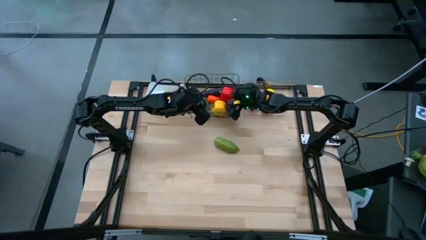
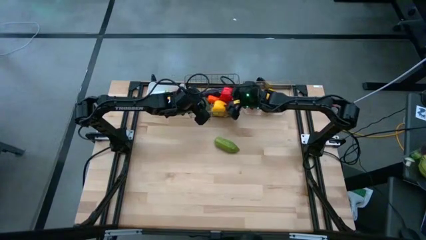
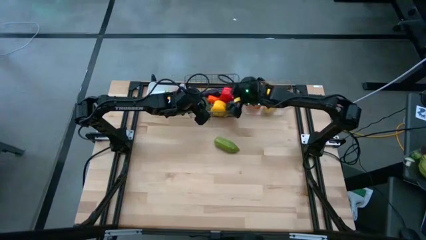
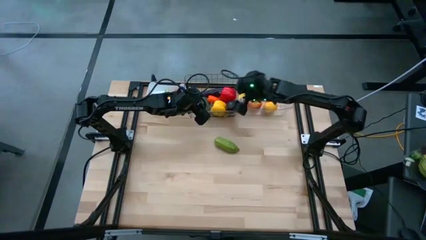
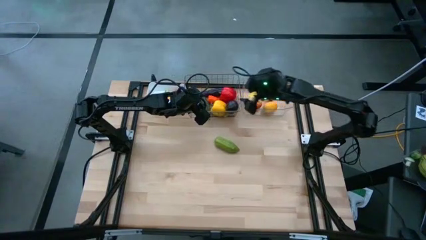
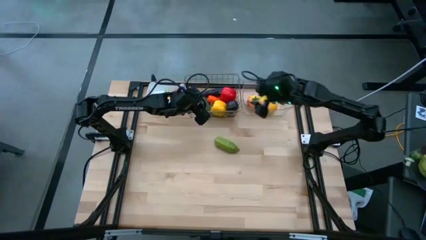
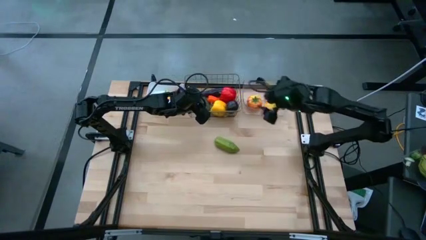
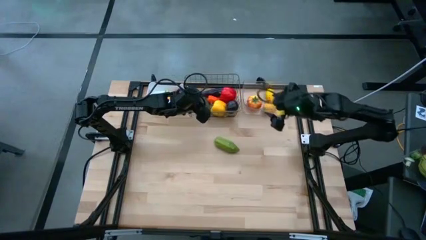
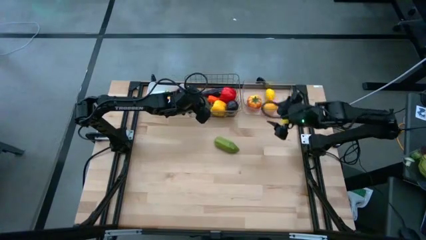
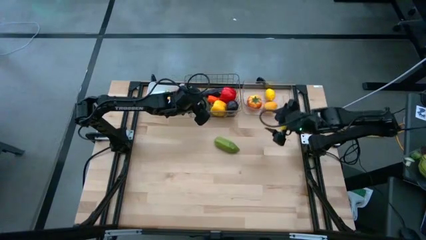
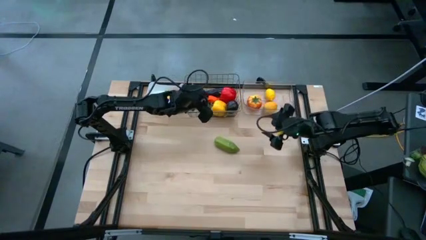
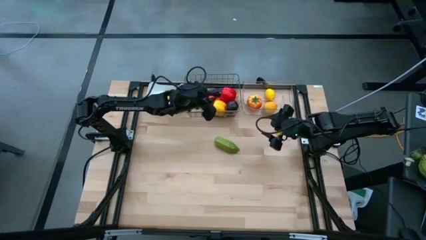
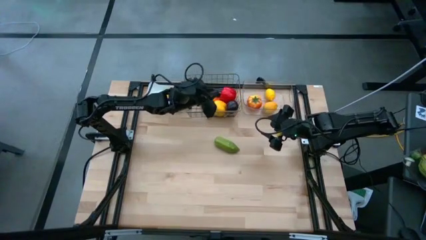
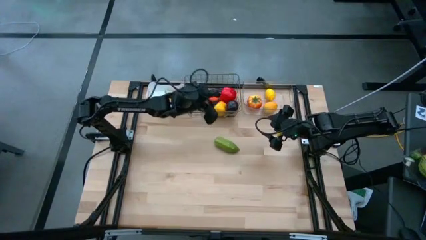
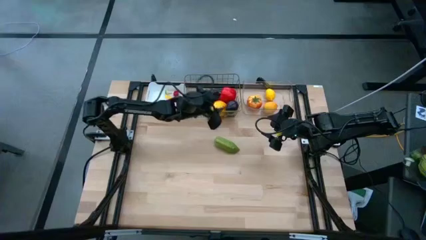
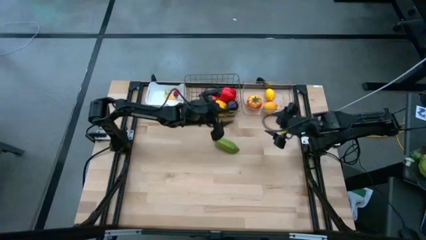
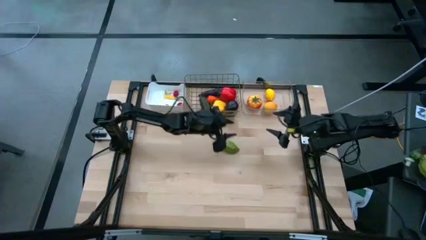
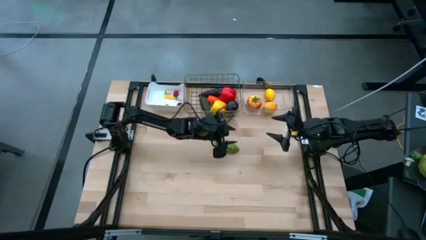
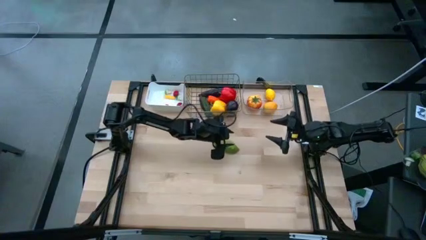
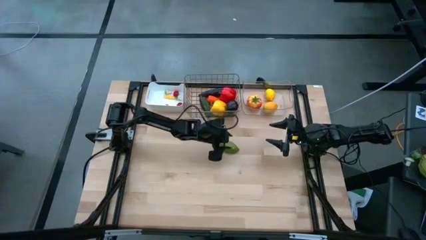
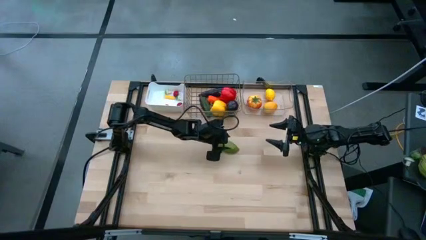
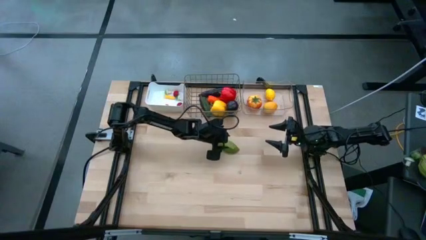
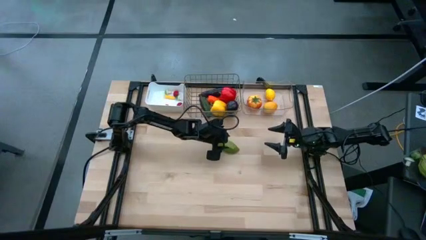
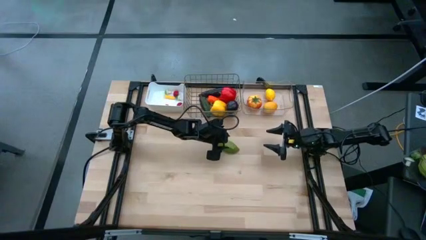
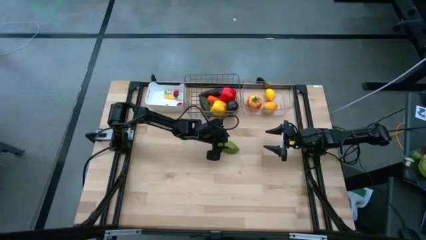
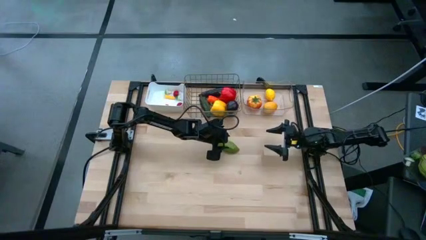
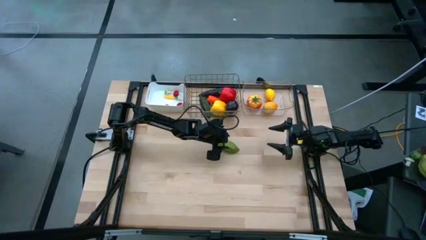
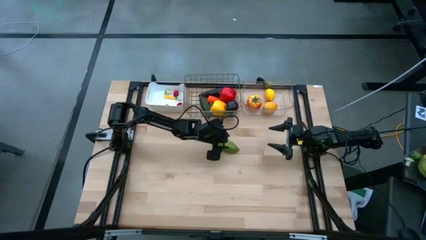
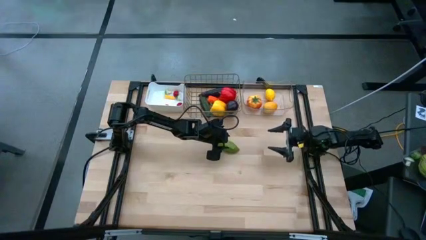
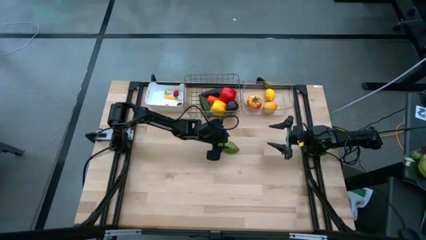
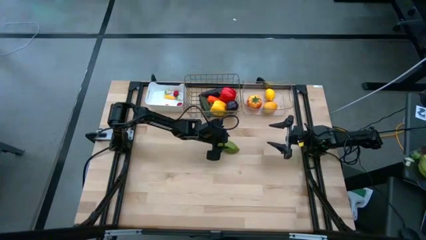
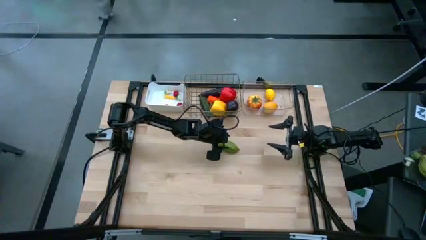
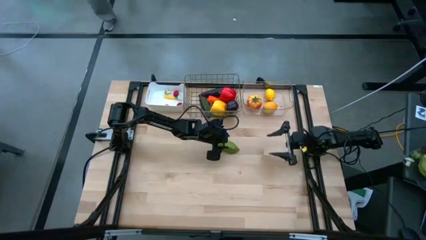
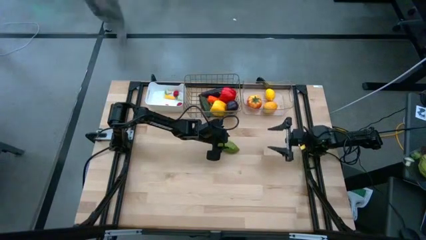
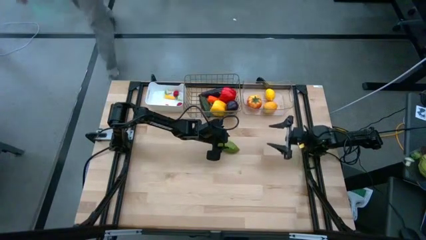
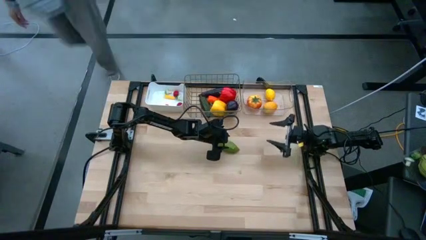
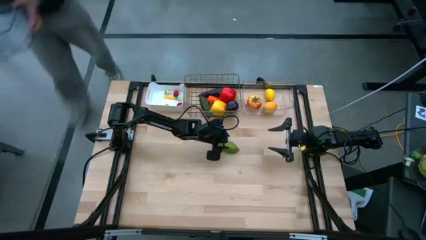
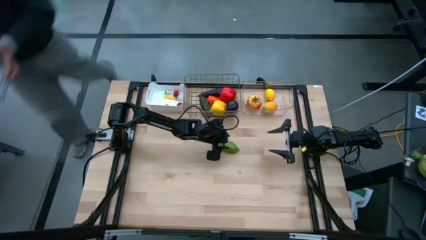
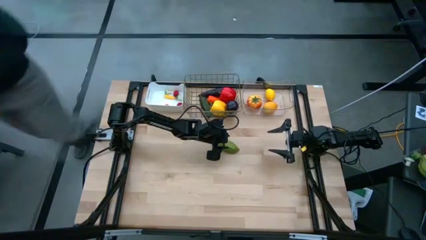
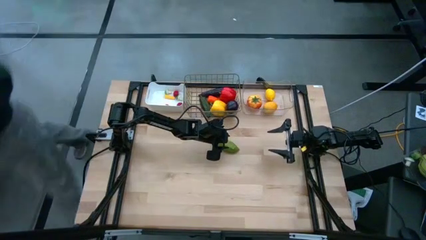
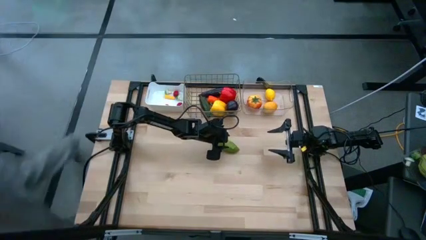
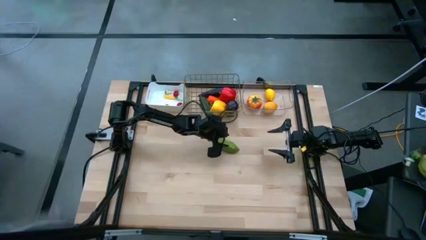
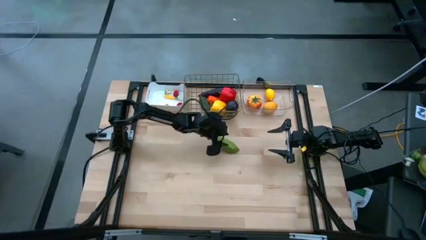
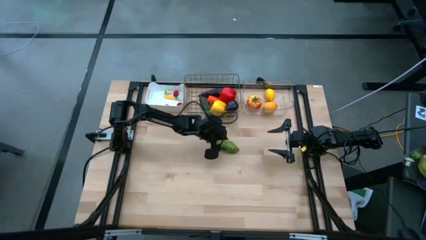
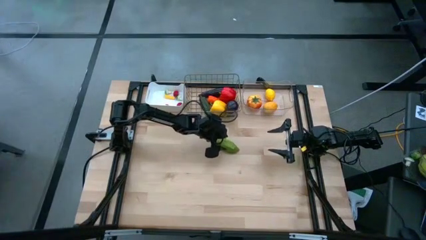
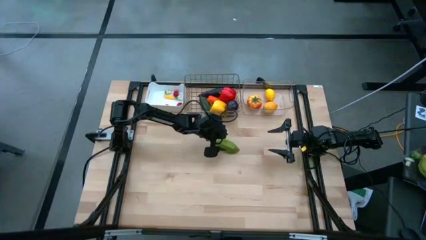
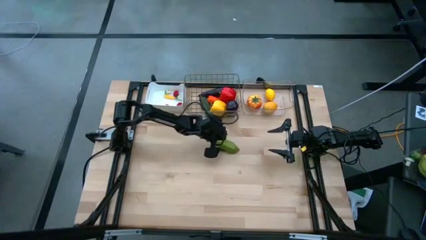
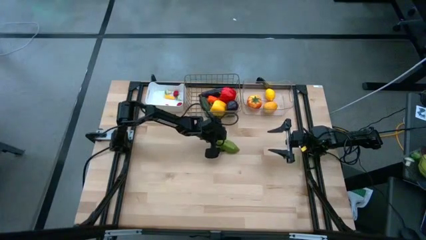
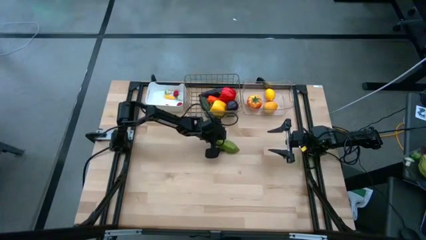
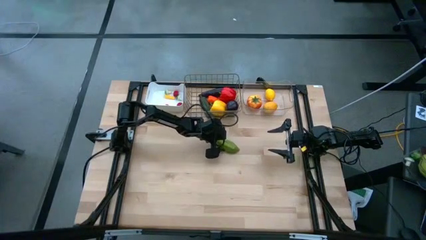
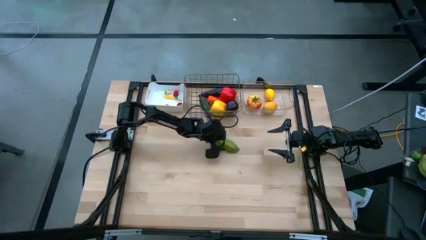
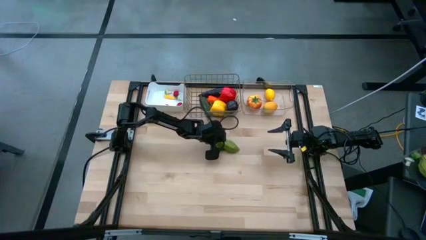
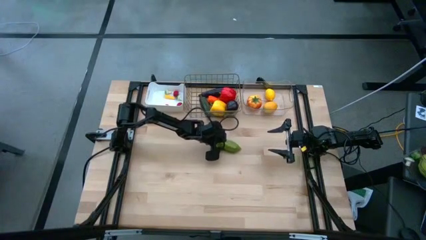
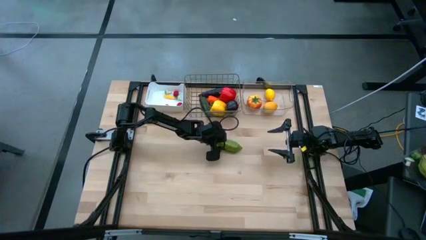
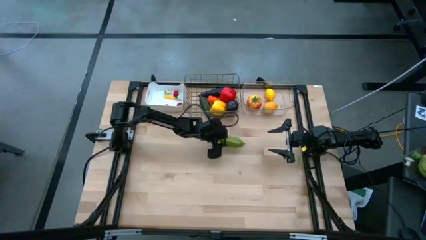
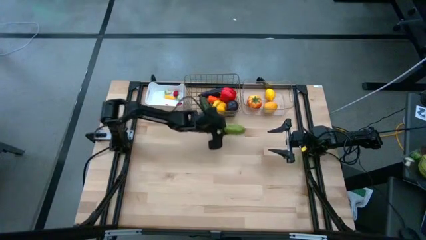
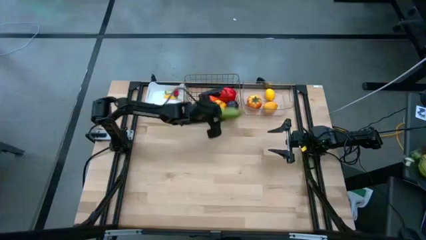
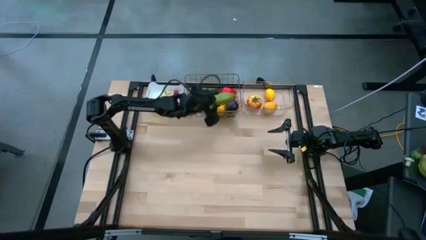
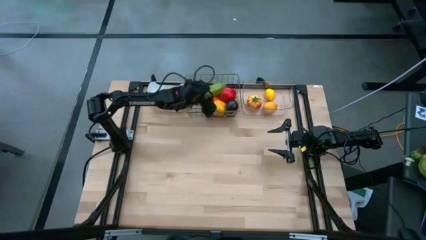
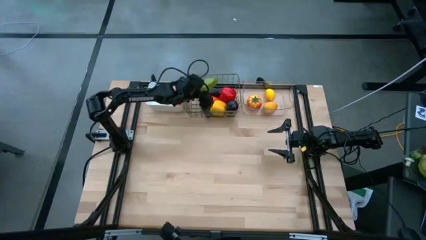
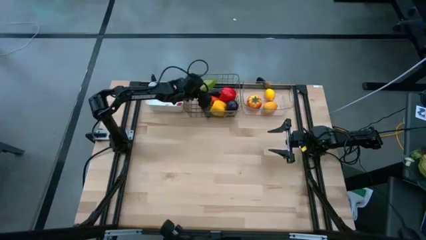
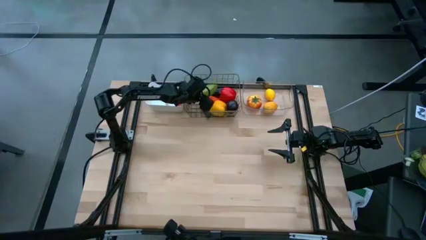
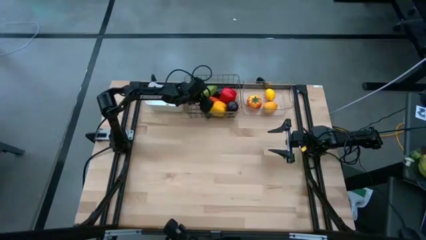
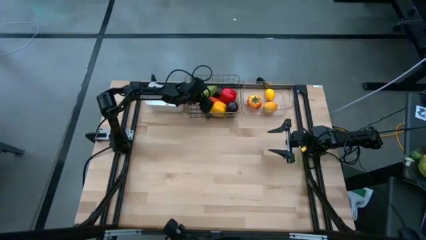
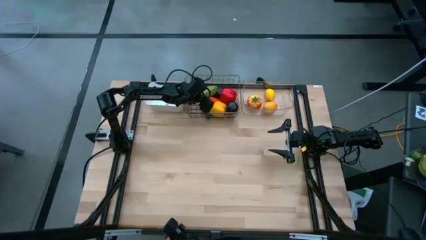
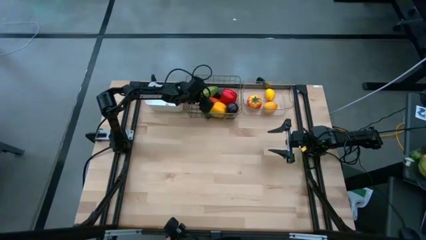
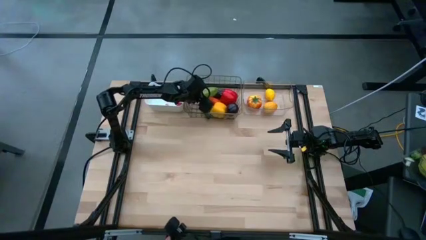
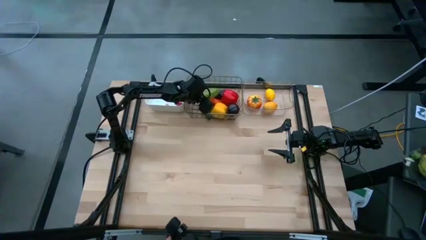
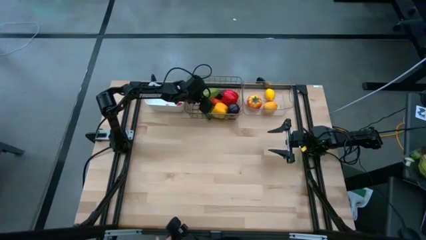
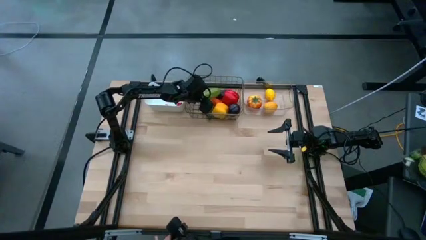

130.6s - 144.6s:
Task: Sort produce into baskets
Put the summer squash into the wire basket
